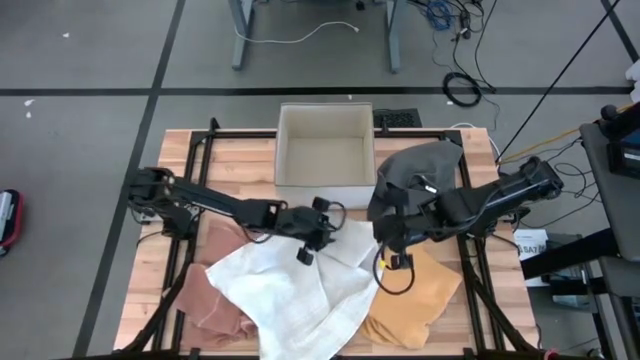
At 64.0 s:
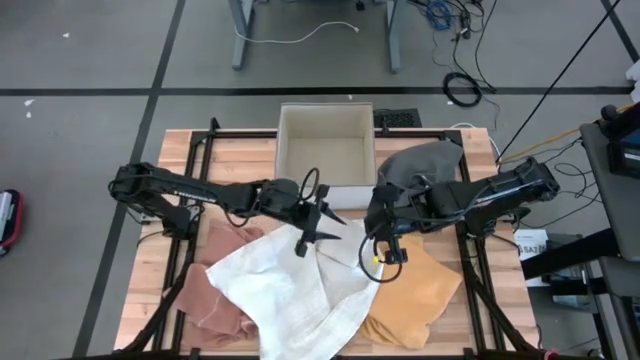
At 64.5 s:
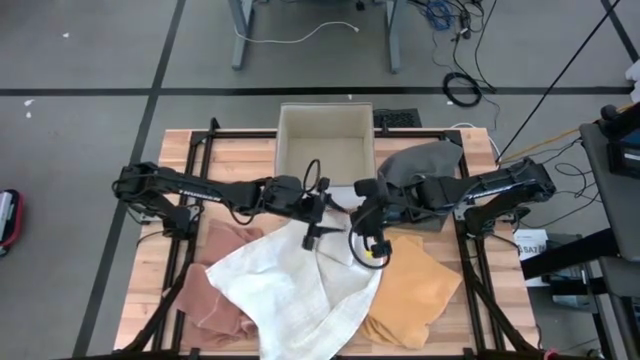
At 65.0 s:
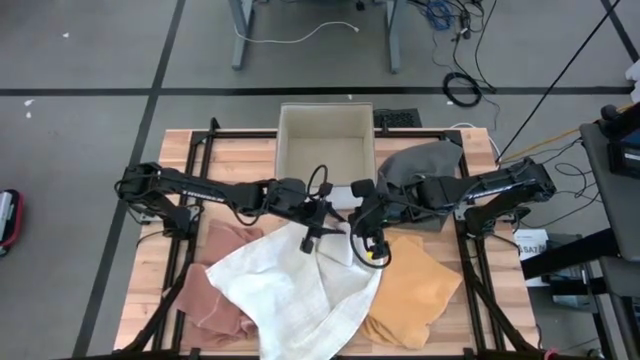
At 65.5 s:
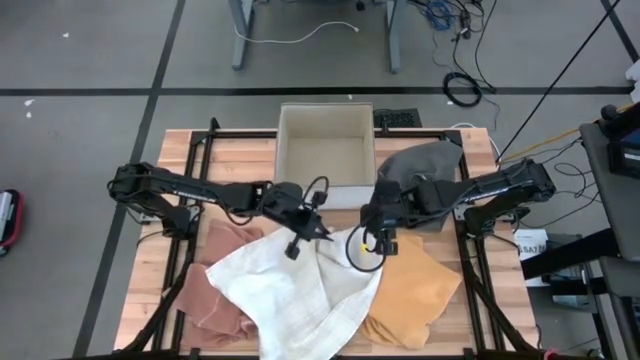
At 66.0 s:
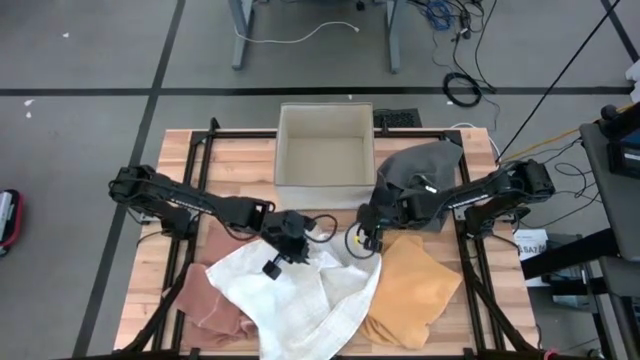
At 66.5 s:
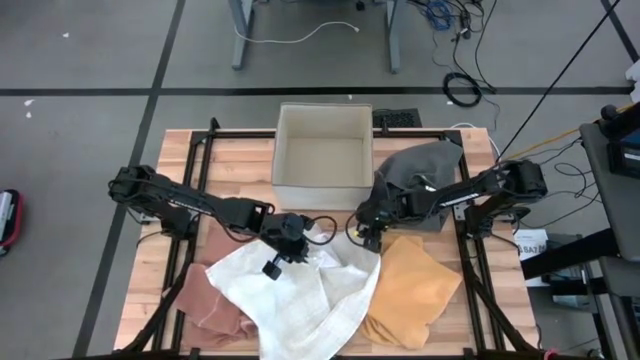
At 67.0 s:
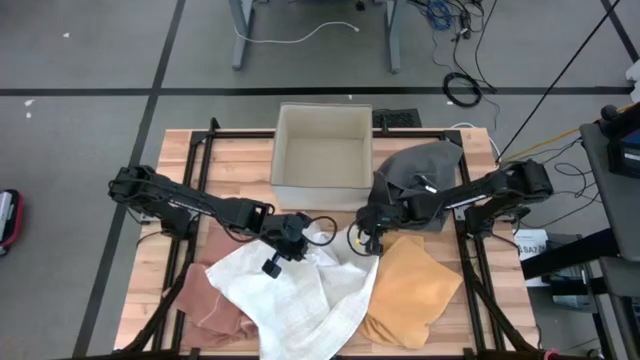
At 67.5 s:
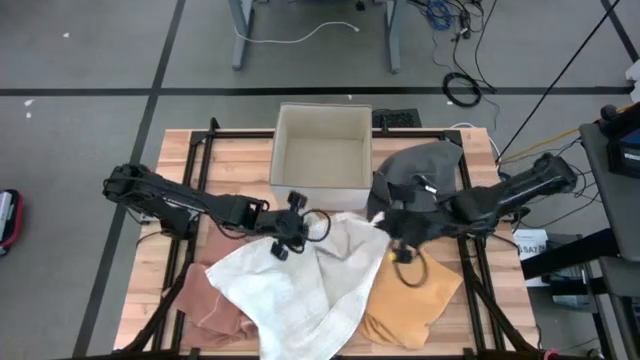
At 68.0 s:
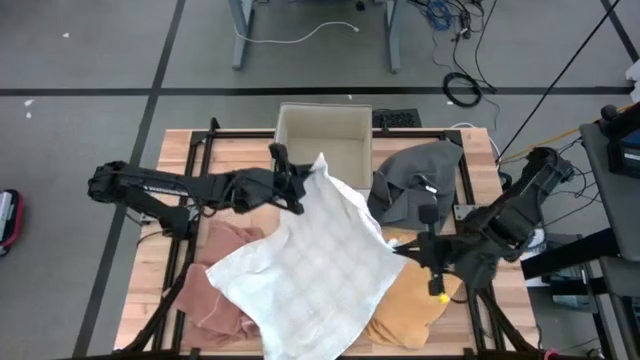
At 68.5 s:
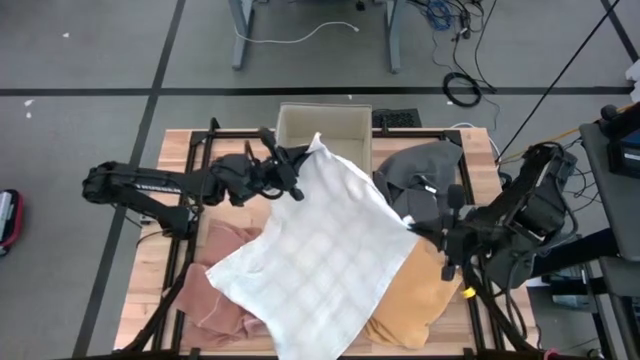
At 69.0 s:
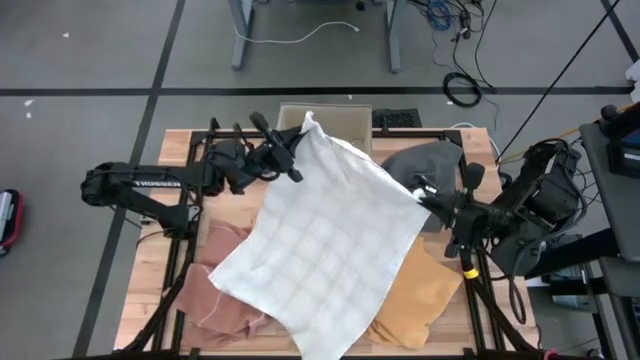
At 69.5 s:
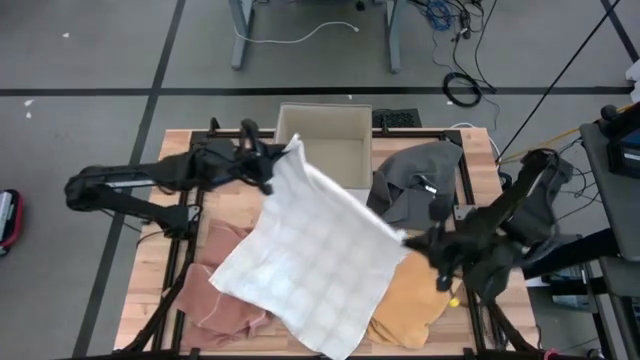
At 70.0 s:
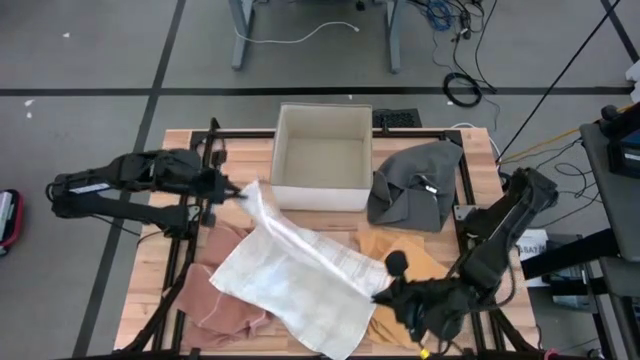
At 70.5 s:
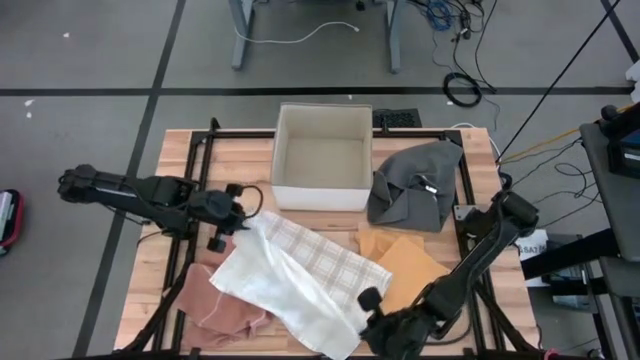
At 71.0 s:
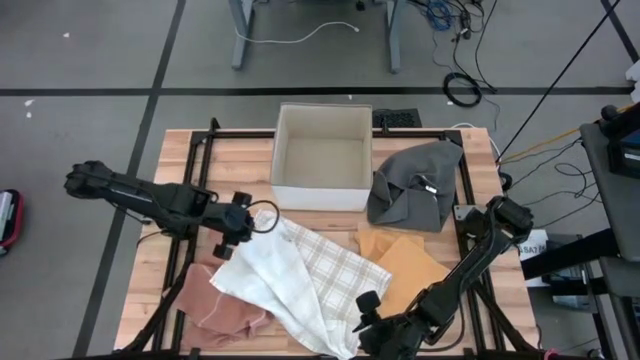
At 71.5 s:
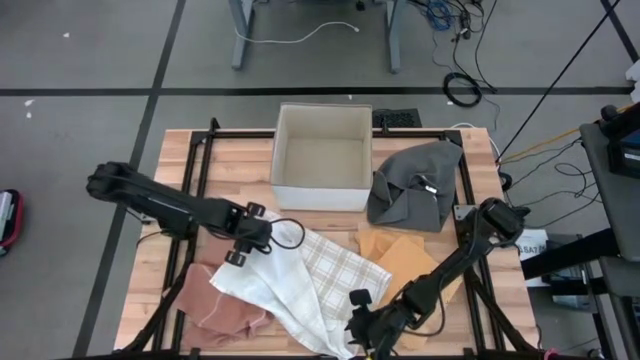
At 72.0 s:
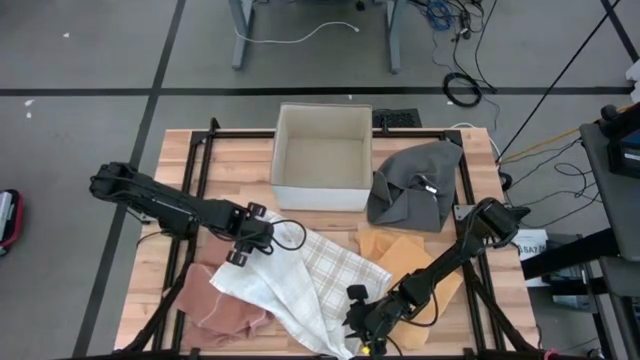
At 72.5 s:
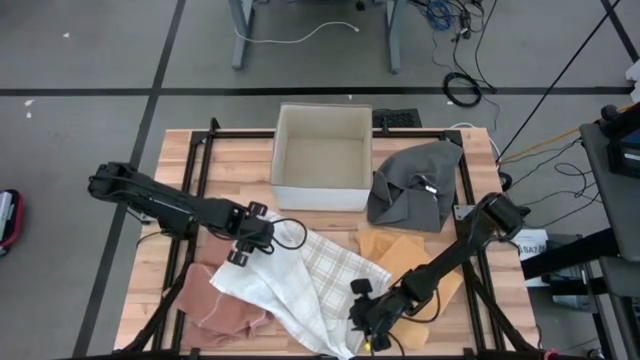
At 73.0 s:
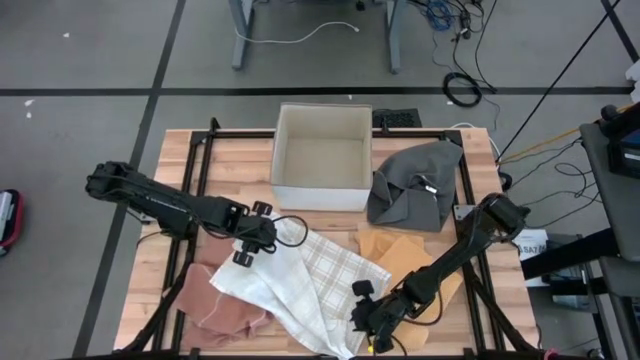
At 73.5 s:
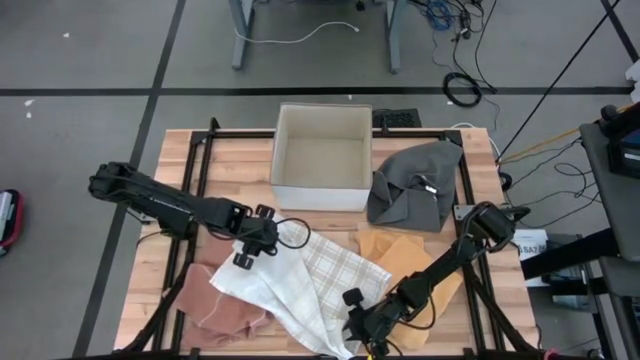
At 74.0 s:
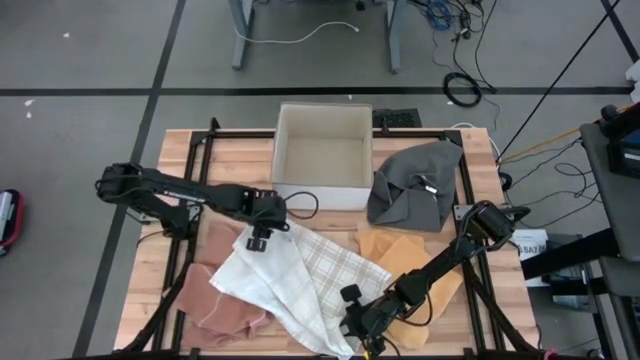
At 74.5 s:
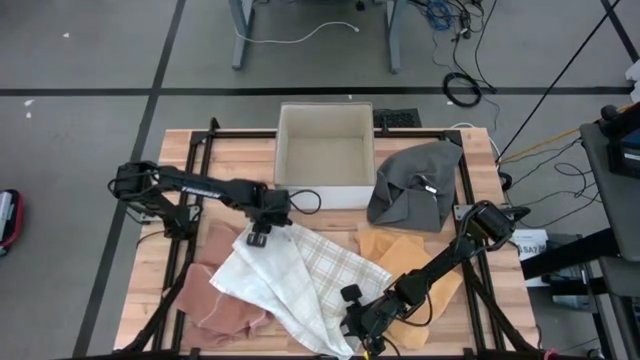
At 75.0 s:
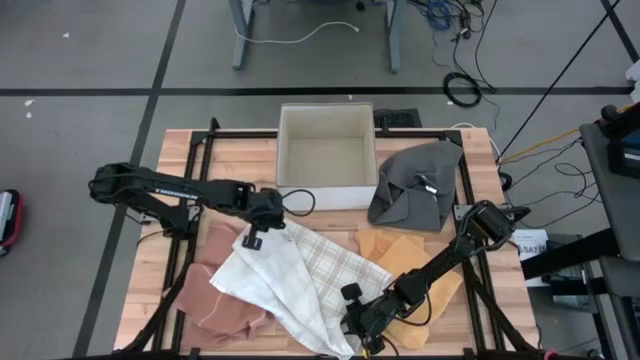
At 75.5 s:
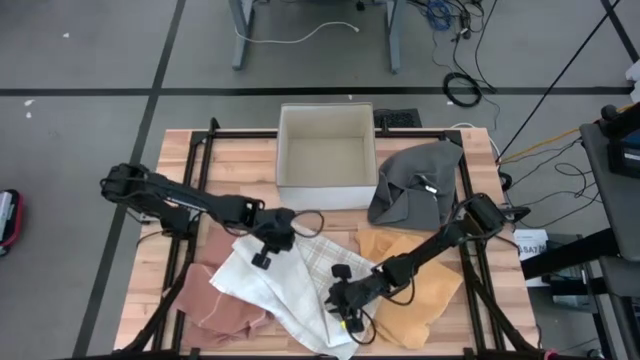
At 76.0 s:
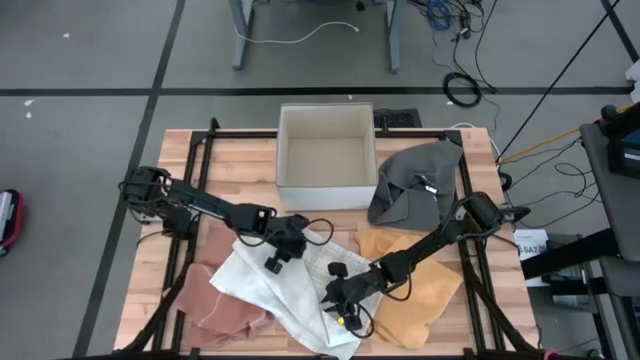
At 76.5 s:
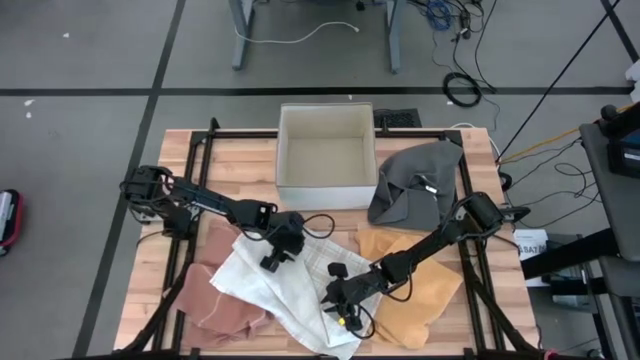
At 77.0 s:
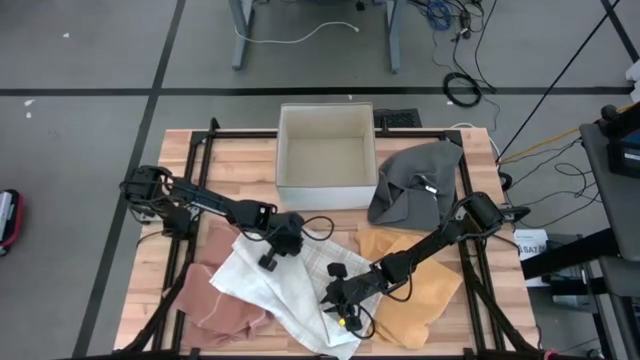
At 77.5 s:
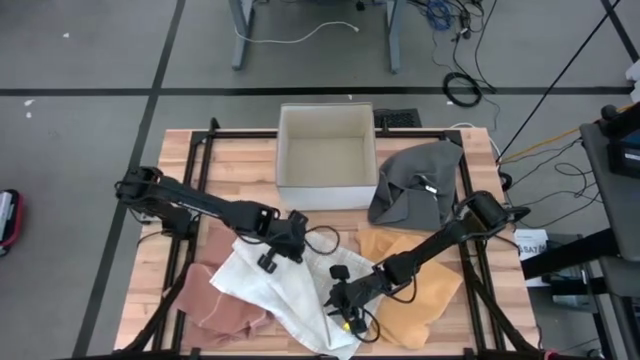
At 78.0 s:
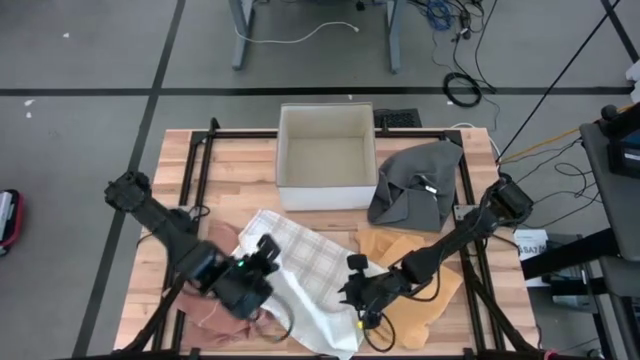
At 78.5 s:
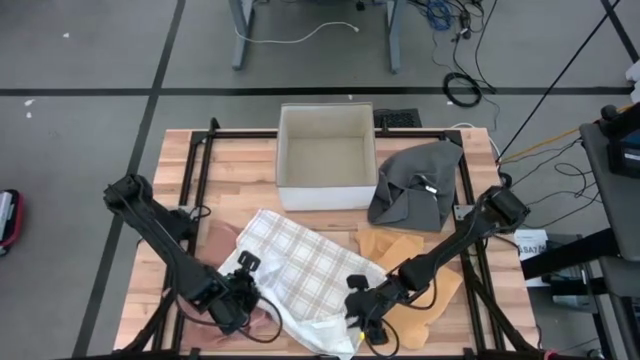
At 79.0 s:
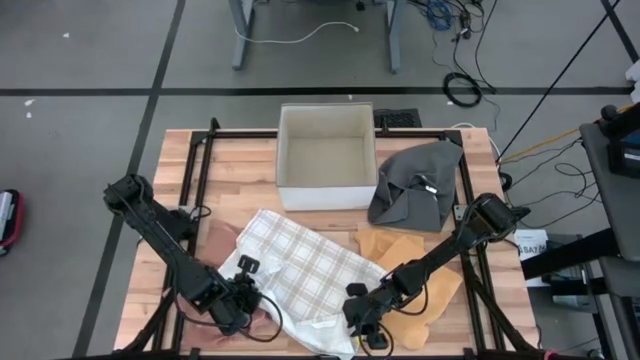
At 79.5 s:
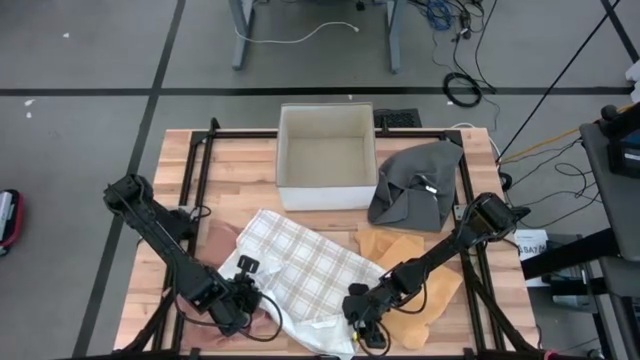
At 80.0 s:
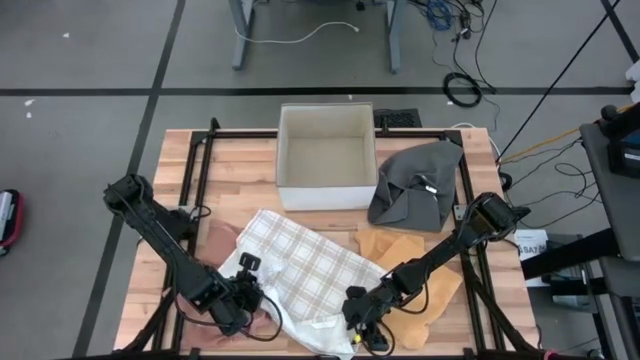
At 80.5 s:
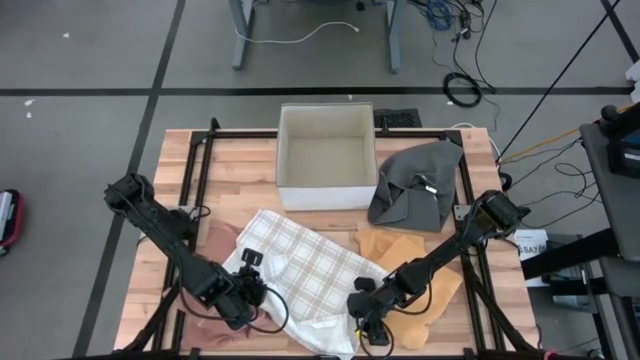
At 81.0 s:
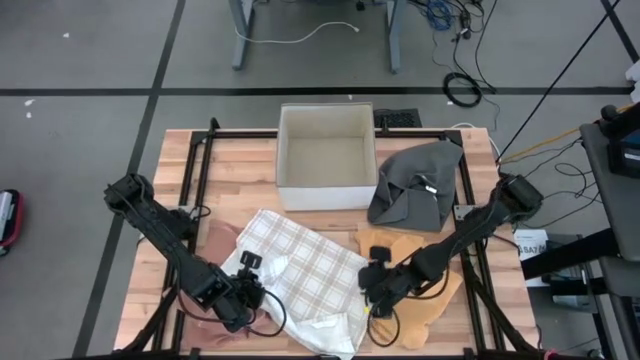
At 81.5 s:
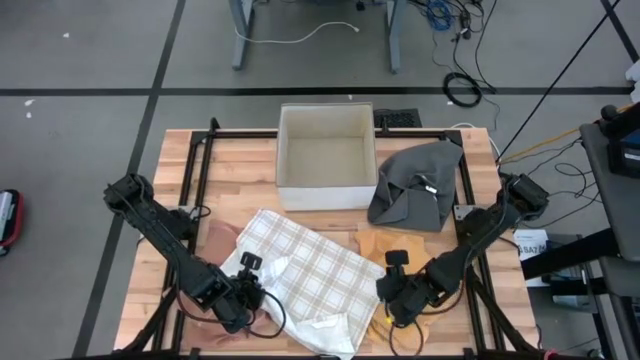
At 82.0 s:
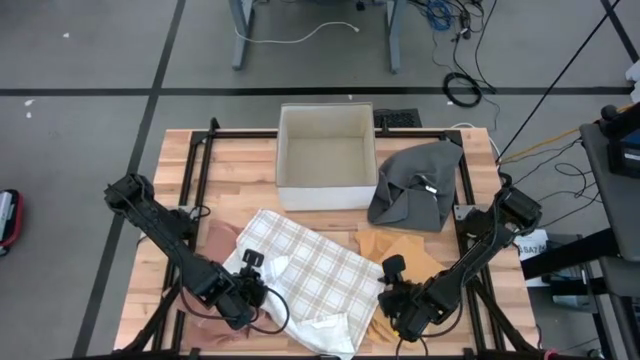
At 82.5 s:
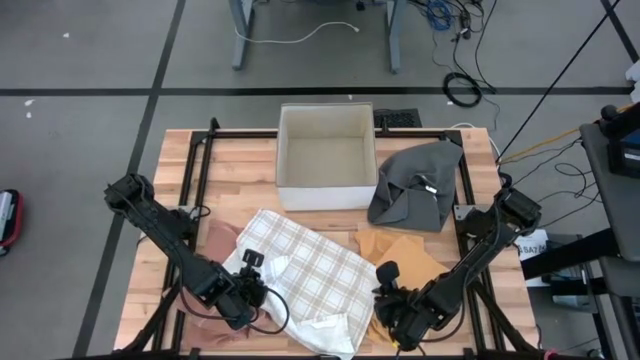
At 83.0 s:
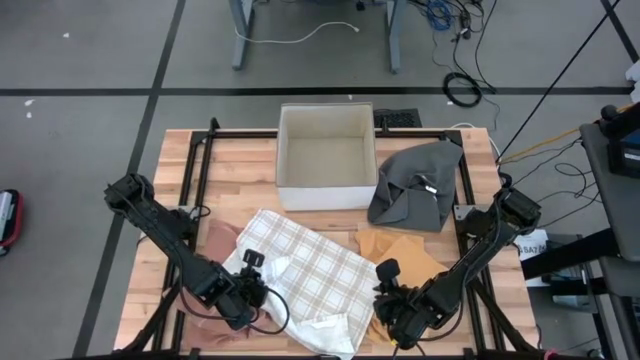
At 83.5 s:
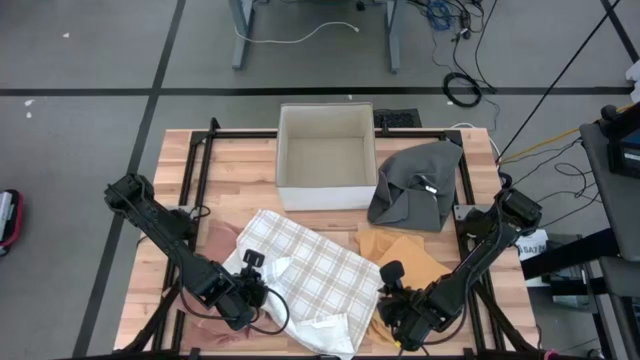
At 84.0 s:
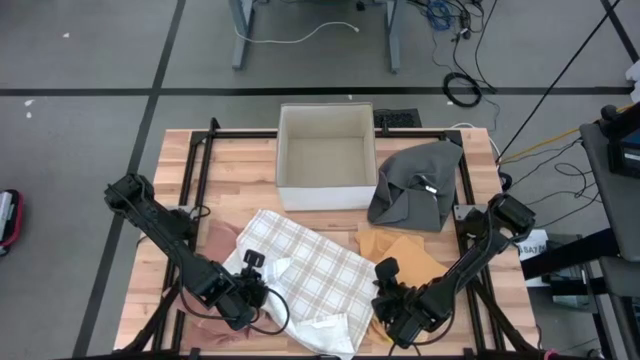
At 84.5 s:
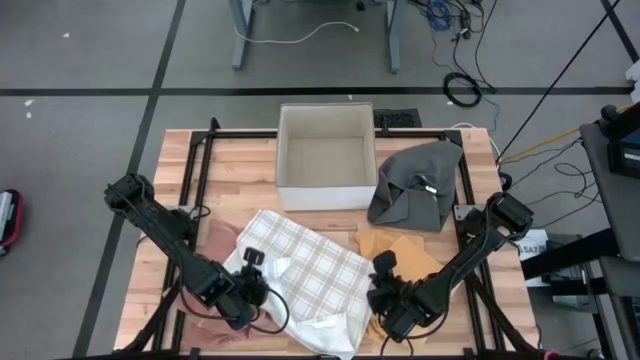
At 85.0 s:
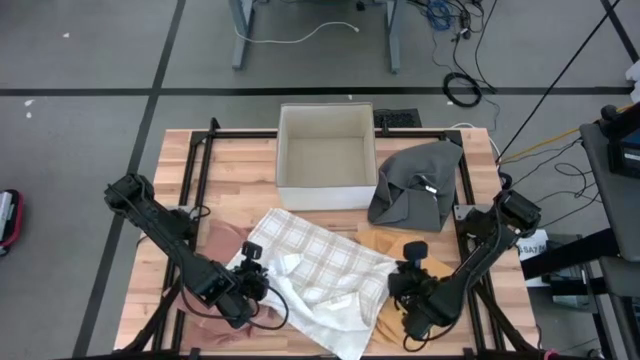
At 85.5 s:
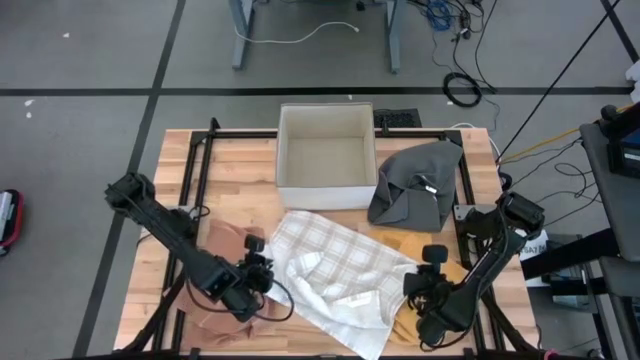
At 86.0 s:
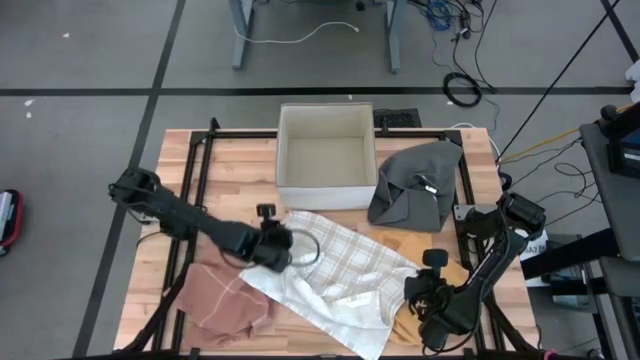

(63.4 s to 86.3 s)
Task: Fold towel
Fold the white patterned towel
